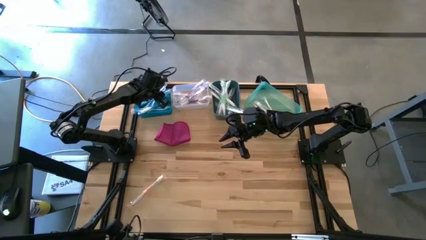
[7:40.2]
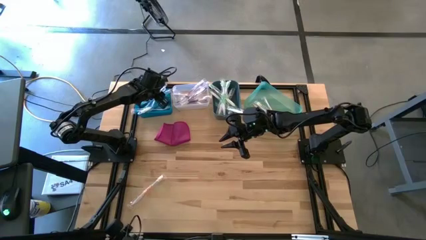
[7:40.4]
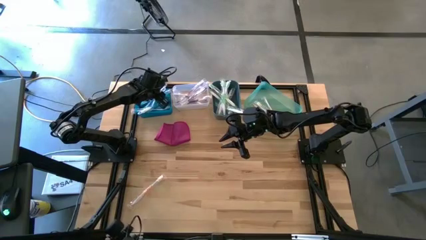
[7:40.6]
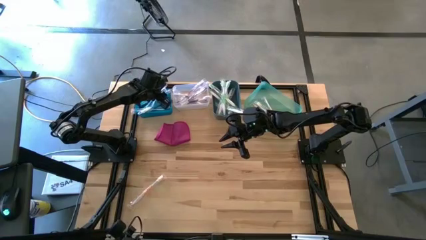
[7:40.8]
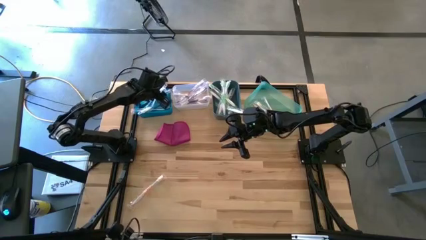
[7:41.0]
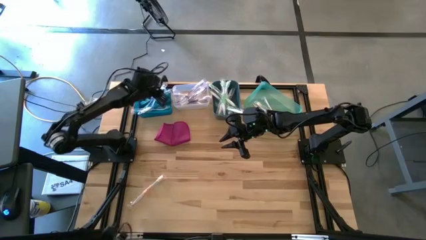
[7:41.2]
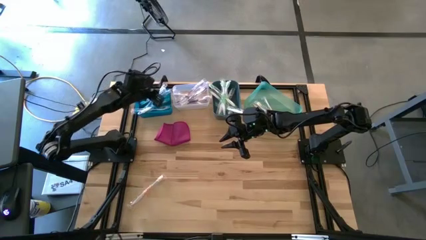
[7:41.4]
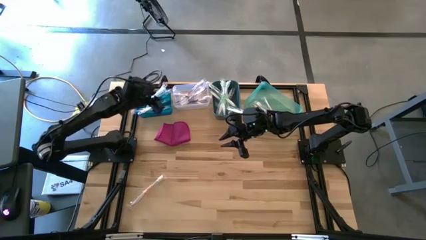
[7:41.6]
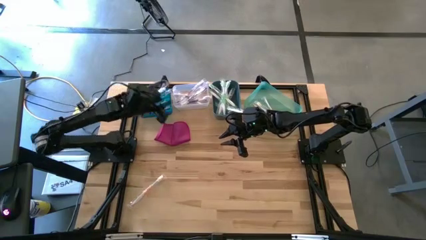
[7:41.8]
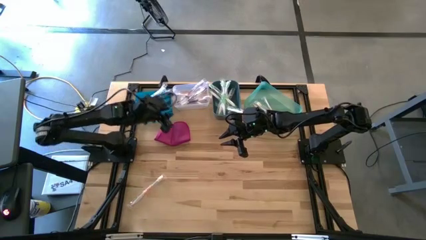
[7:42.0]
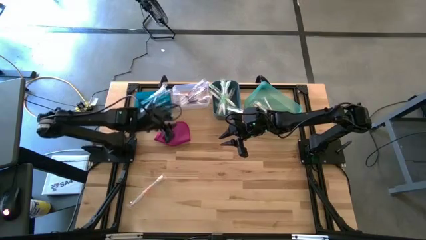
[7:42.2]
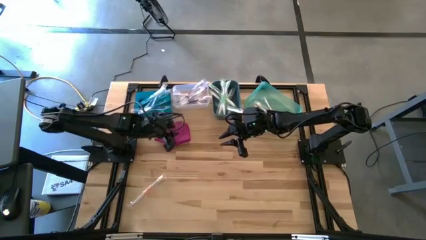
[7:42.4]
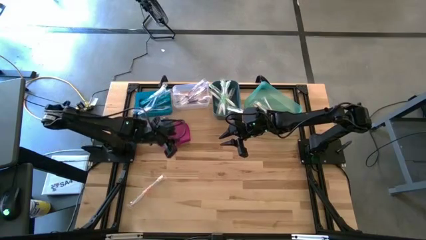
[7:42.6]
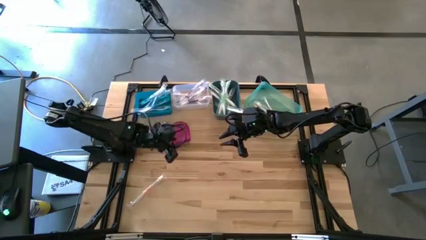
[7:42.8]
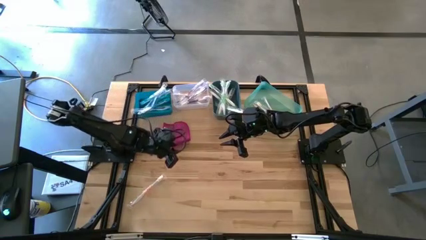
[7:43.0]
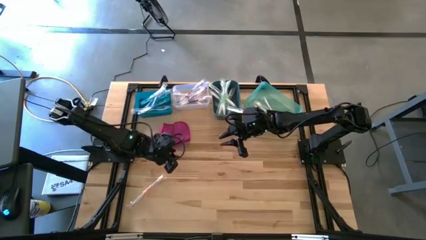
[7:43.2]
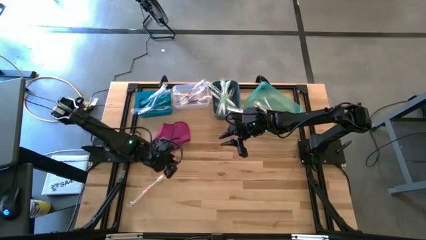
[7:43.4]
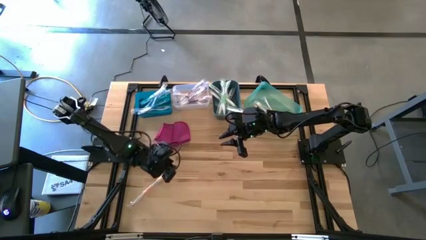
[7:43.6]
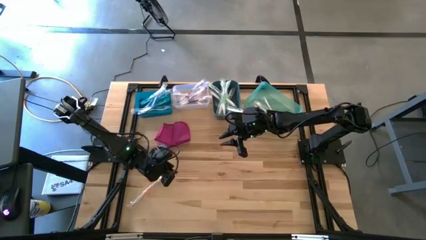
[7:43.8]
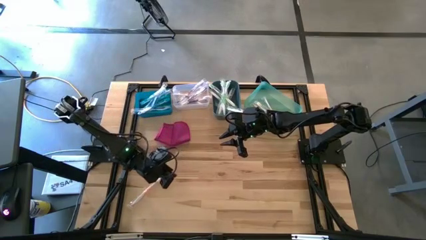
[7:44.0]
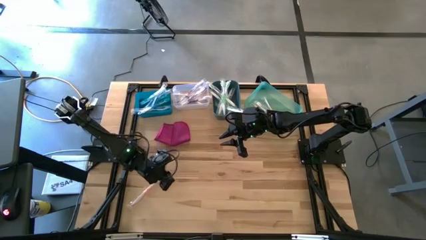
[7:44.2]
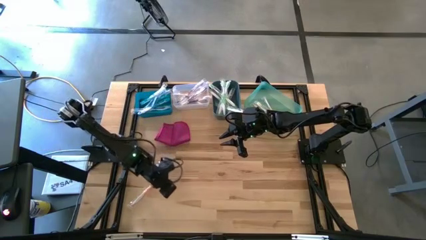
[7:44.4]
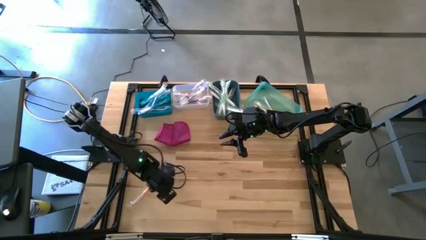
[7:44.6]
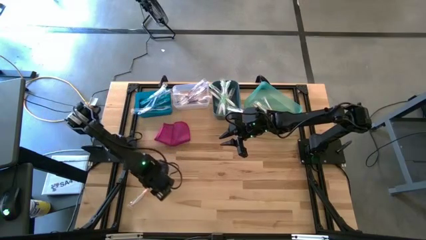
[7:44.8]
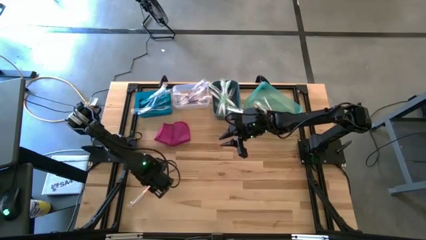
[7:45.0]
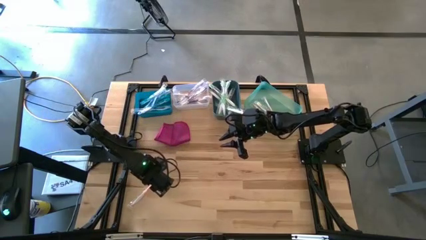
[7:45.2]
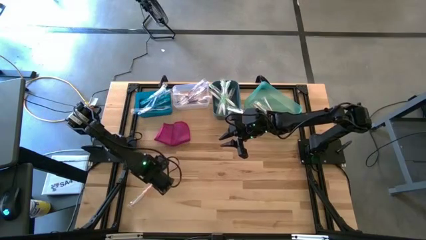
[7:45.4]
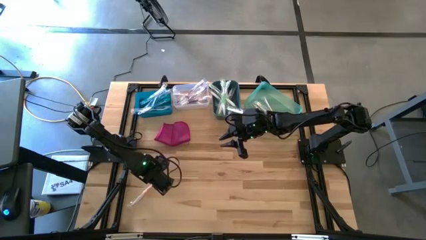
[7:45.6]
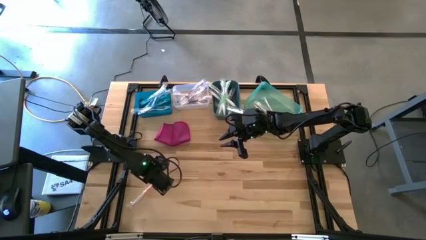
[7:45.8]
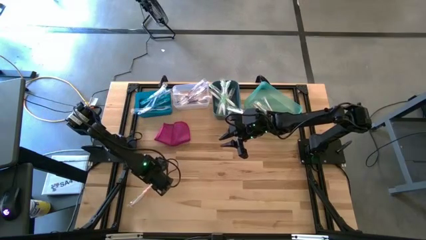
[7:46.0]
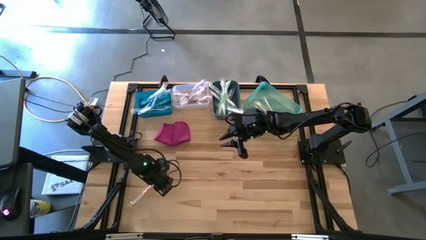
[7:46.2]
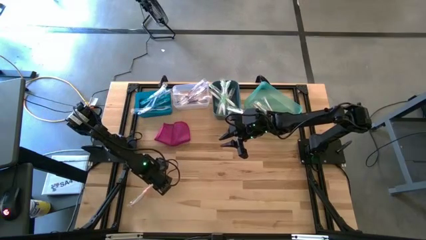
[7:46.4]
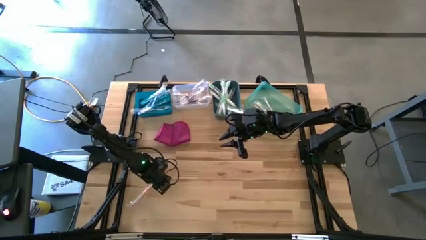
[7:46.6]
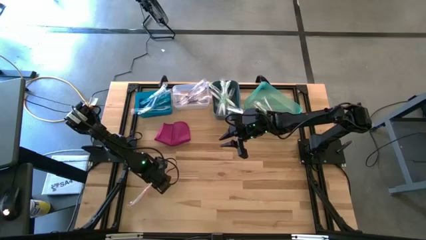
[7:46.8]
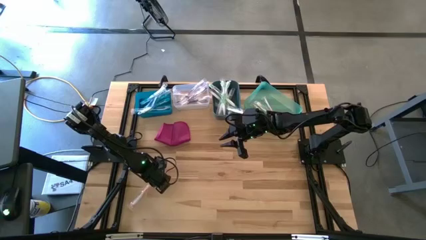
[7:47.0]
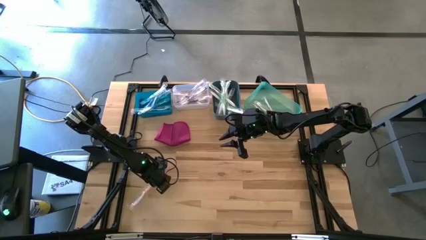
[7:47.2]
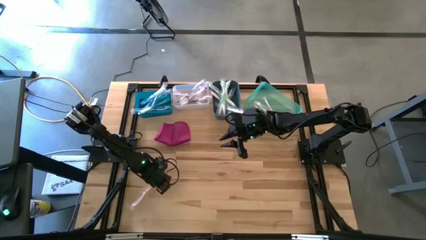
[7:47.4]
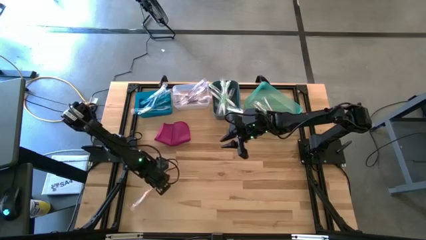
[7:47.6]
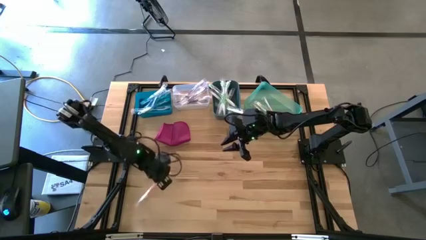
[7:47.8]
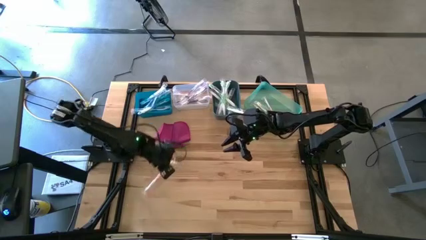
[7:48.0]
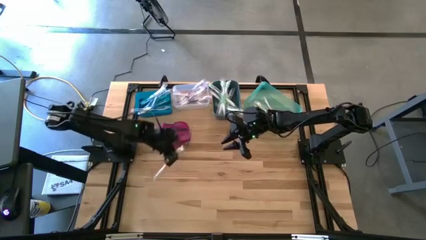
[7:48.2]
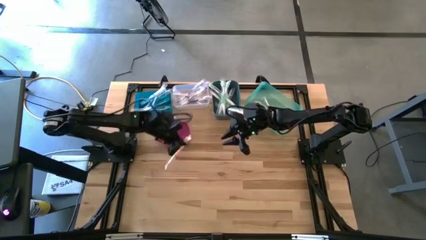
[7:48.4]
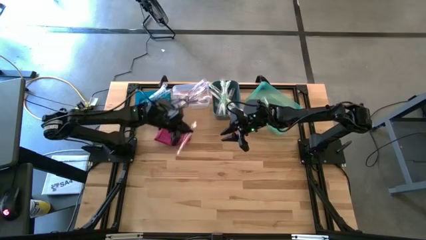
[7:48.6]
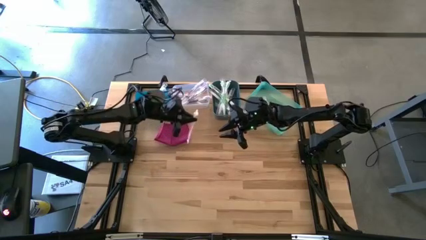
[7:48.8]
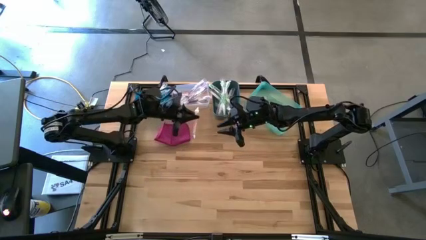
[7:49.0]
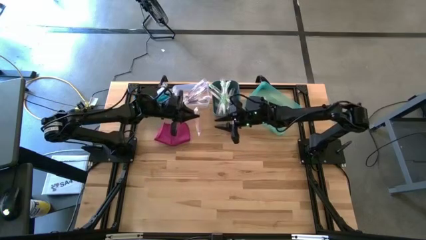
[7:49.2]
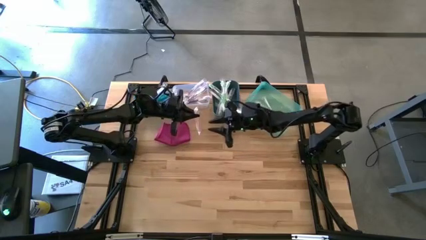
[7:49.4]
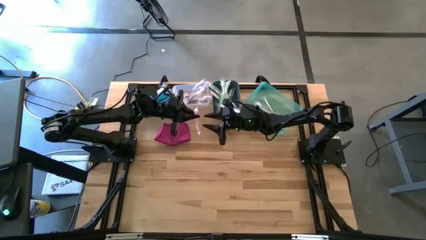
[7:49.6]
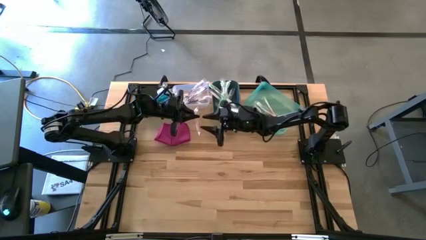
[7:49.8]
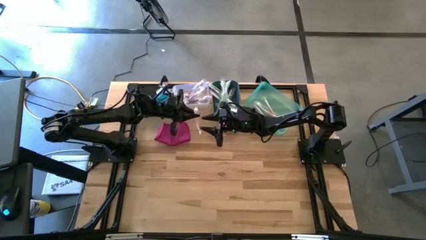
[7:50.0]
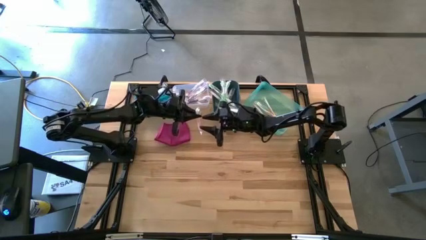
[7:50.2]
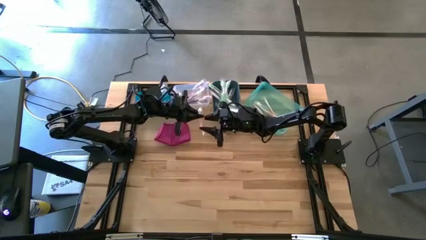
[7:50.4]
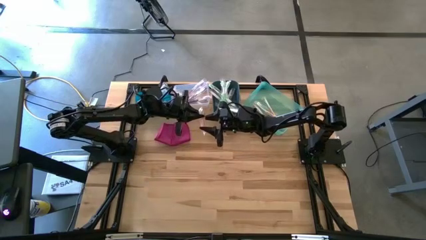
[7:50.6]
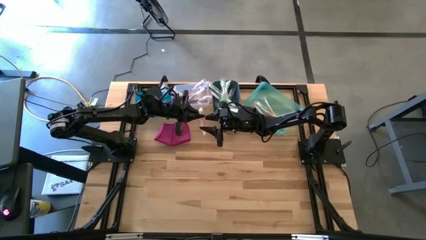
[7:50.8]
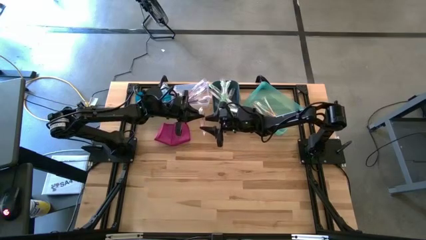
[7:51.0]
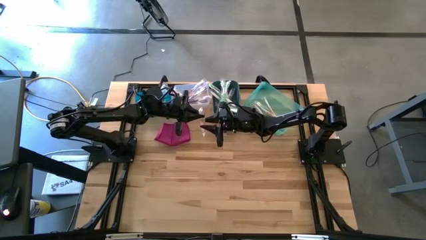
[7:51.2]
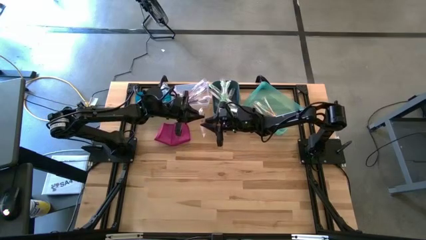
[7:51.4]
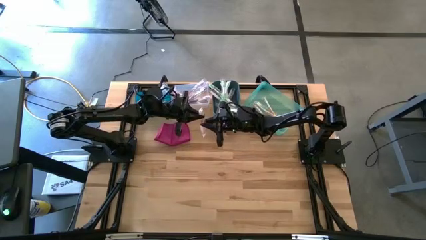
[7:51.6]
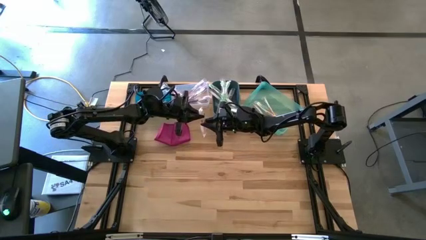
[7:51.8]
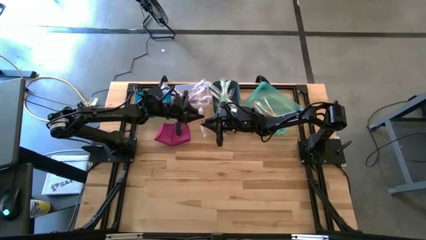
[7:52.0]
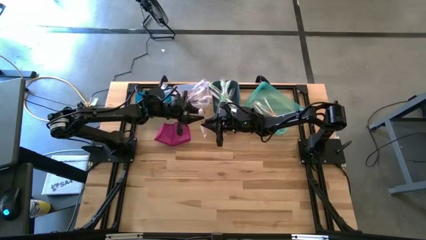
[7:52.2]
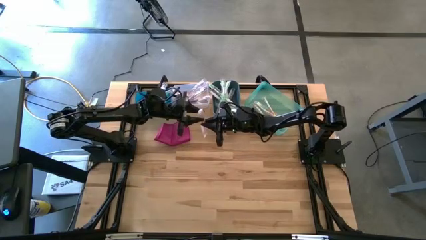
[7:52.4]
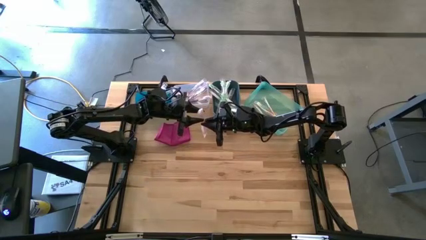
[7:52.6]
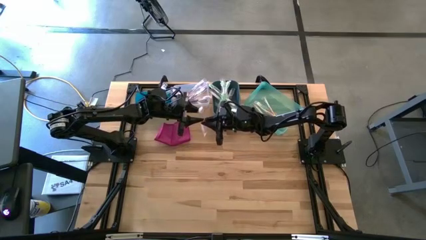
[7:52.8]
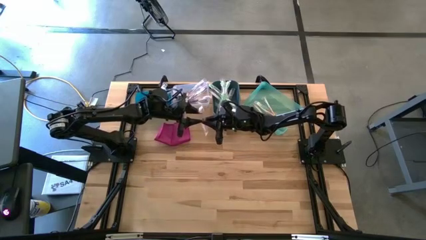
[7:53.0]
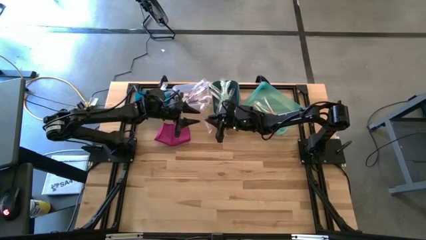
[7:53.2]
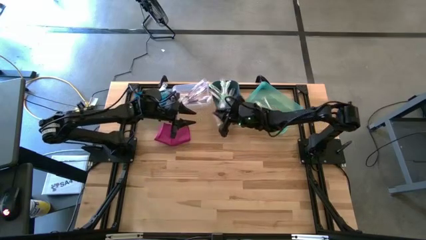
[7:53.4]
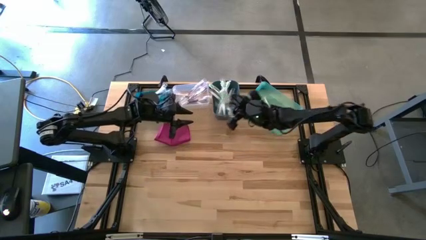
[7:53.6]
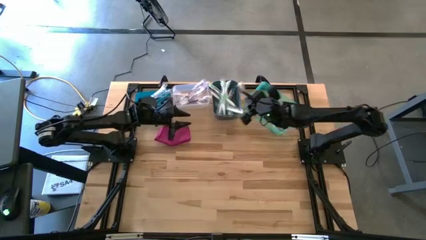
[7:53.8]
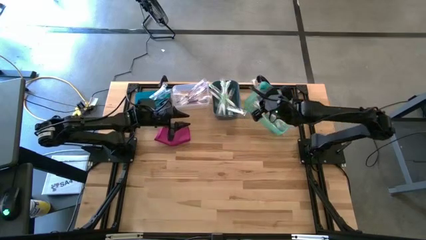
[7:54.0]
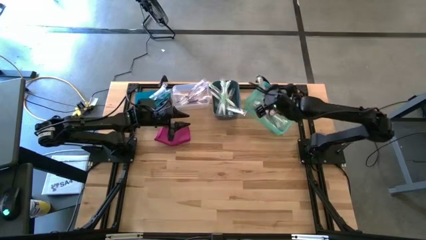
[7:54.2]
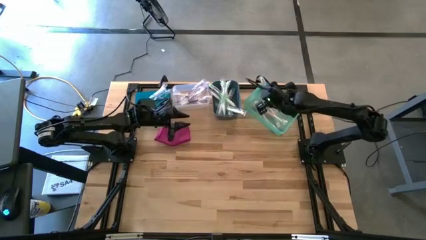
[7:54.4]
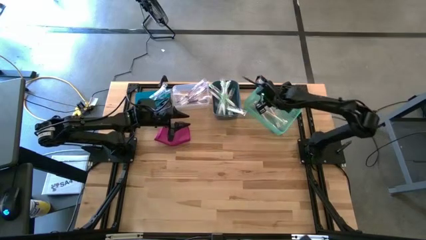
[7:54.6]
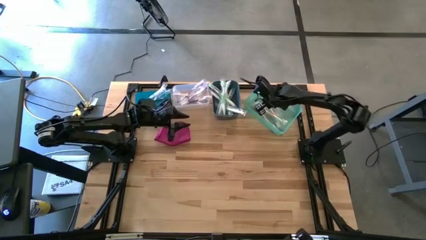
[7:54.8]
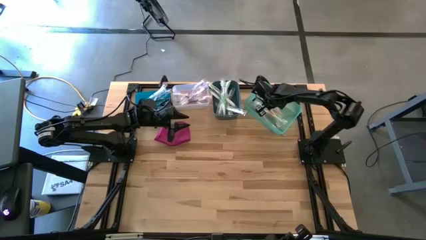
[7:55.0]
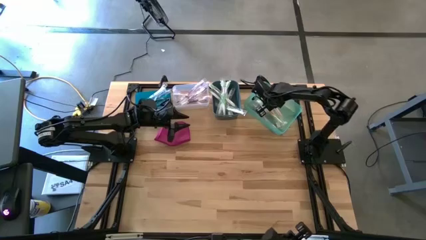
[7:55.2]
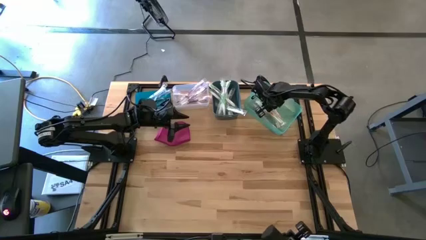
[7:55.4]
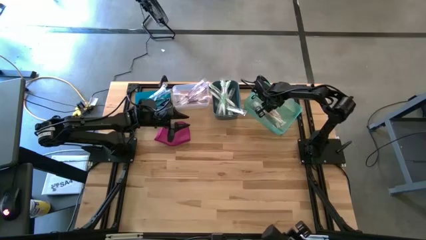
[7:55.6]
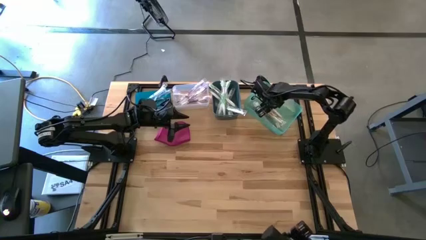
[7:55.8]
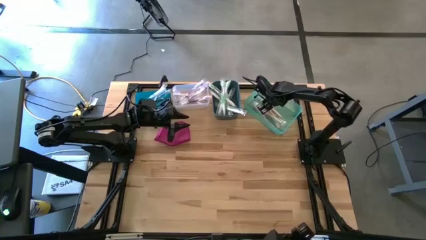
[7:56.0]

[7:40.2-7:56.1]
Task: Pick & Place Toothbrushes
Put the orange toothbrush into the light blue bin
